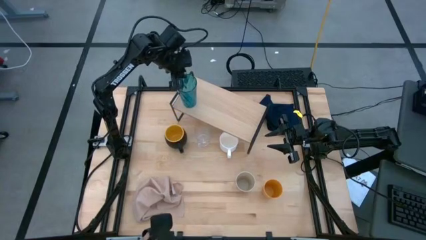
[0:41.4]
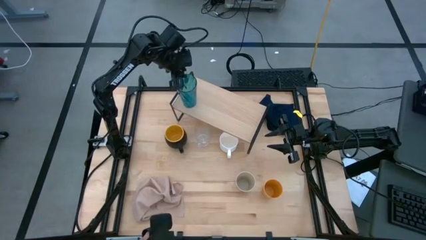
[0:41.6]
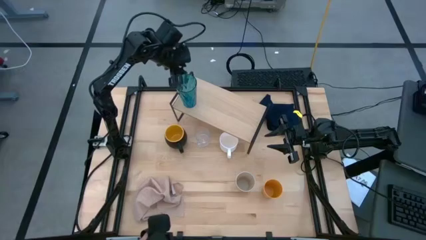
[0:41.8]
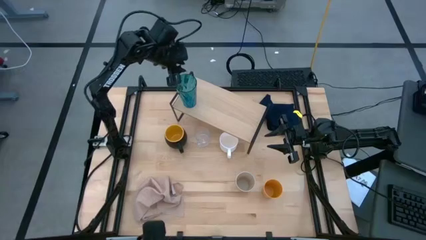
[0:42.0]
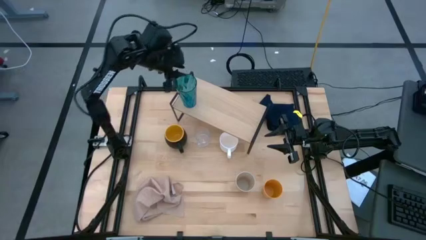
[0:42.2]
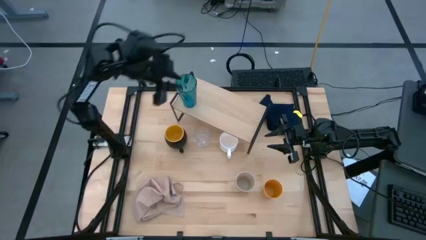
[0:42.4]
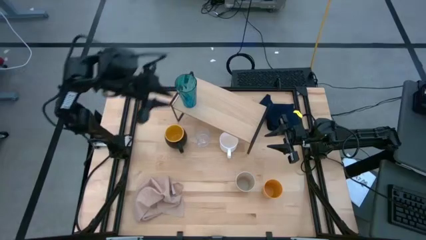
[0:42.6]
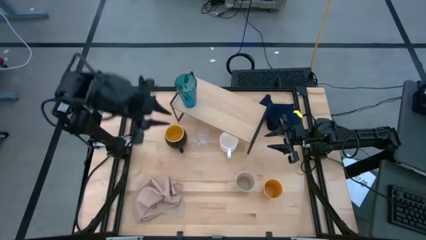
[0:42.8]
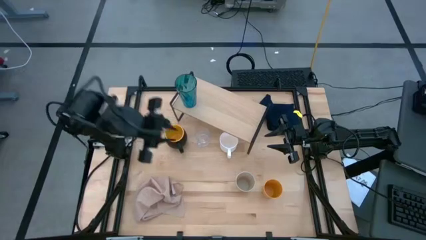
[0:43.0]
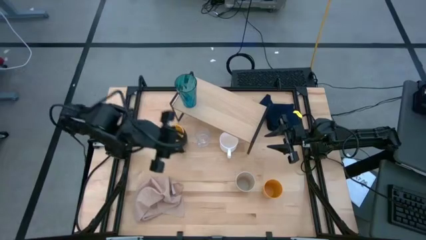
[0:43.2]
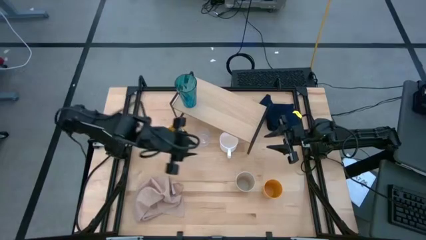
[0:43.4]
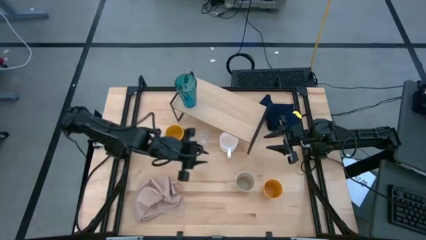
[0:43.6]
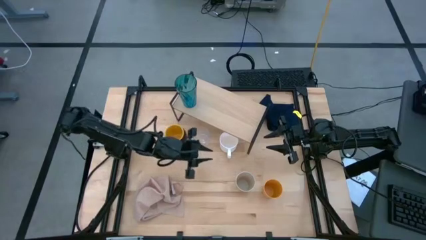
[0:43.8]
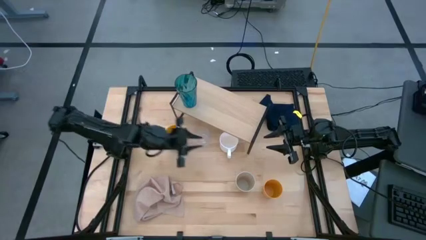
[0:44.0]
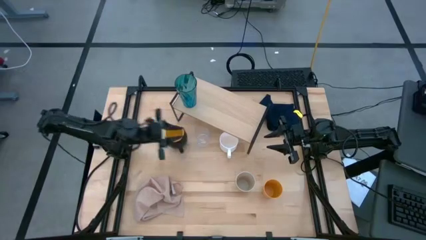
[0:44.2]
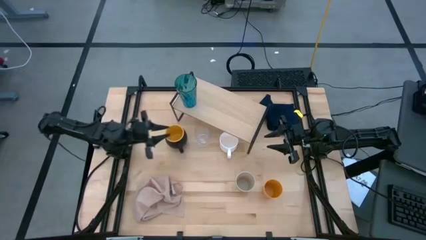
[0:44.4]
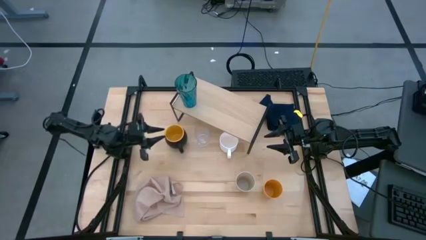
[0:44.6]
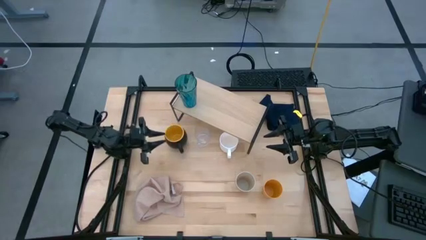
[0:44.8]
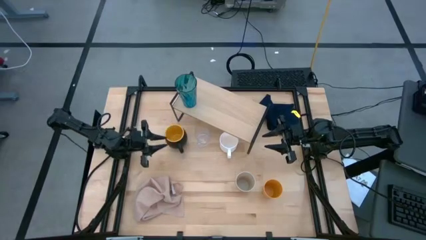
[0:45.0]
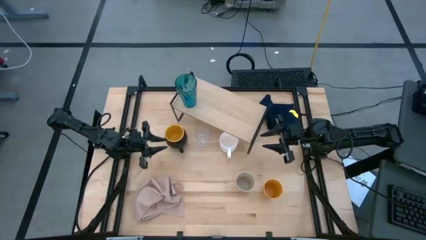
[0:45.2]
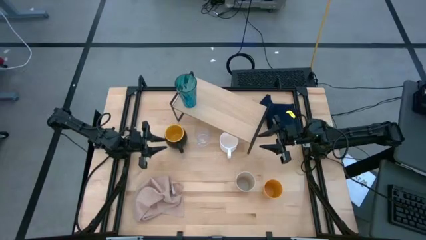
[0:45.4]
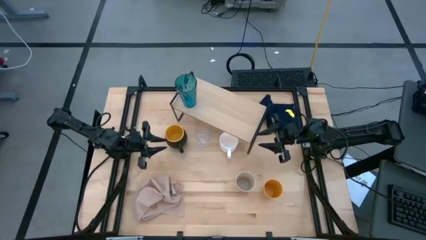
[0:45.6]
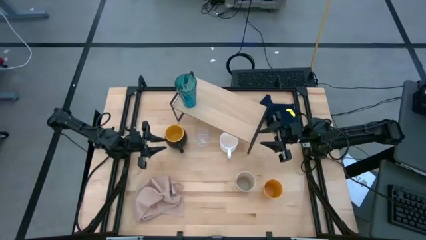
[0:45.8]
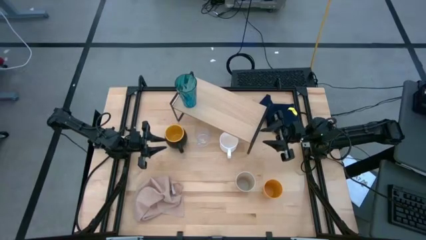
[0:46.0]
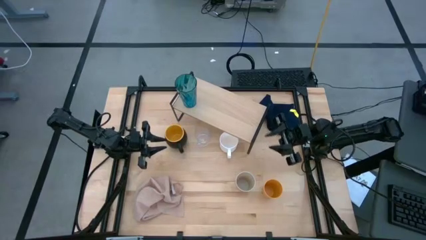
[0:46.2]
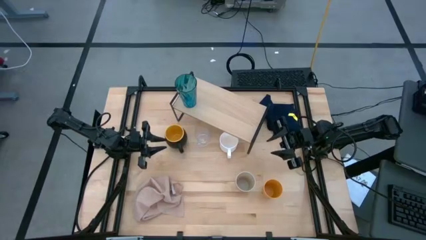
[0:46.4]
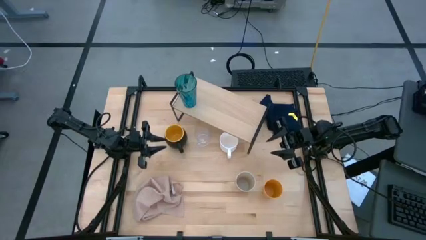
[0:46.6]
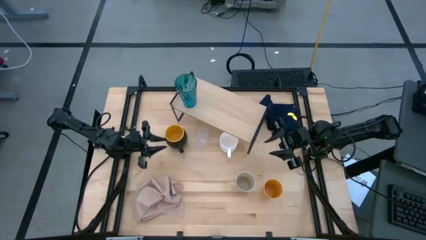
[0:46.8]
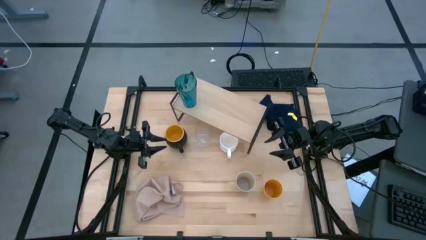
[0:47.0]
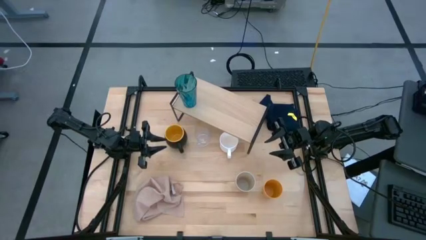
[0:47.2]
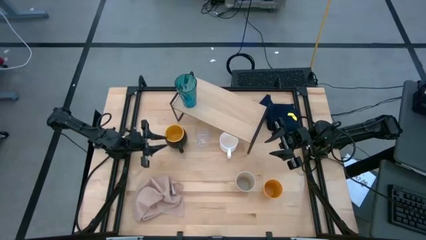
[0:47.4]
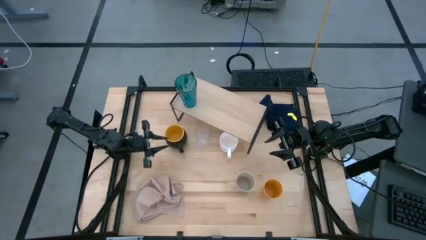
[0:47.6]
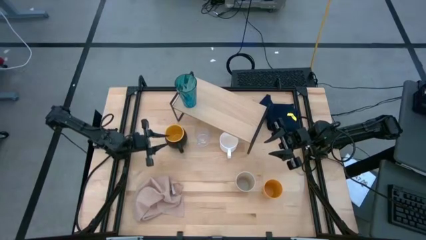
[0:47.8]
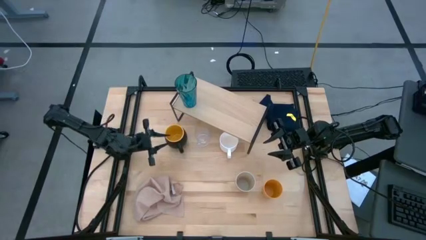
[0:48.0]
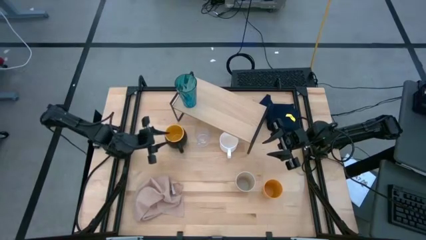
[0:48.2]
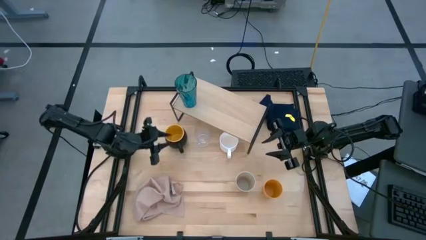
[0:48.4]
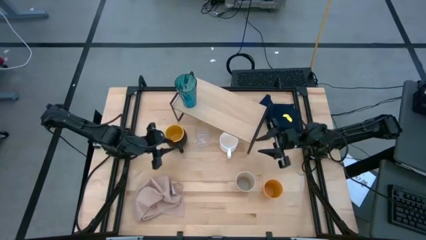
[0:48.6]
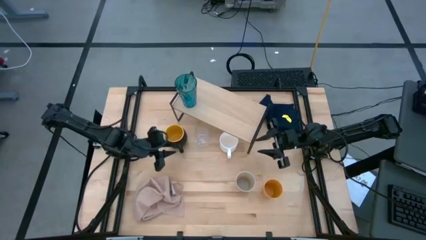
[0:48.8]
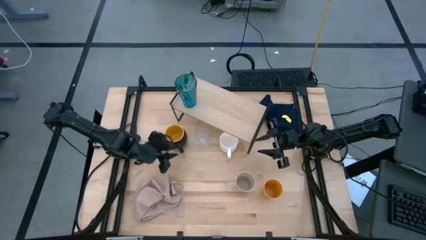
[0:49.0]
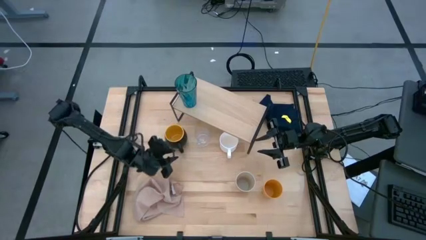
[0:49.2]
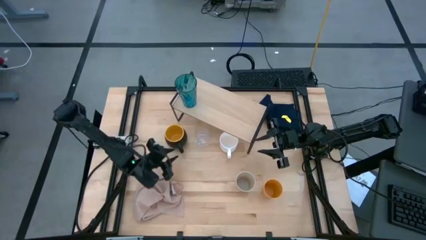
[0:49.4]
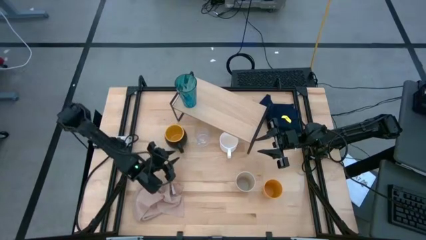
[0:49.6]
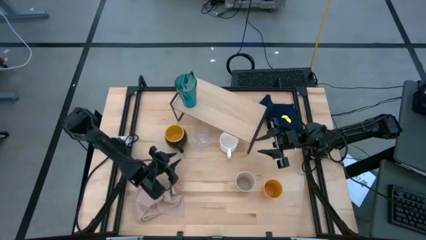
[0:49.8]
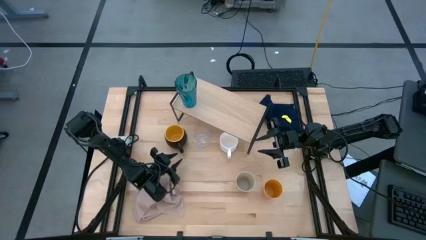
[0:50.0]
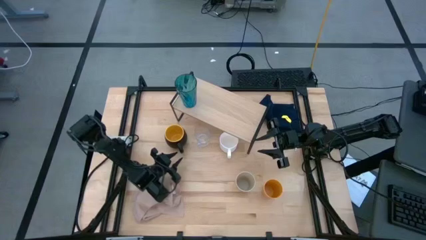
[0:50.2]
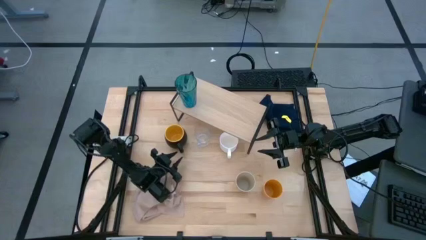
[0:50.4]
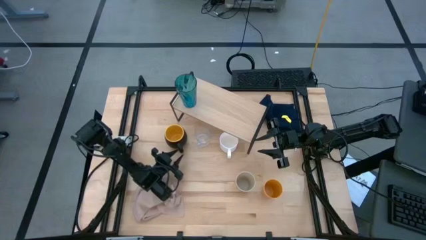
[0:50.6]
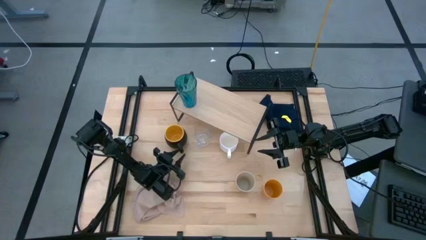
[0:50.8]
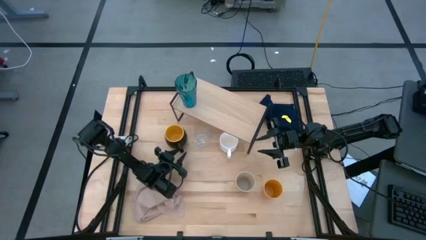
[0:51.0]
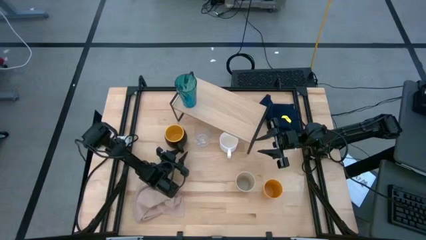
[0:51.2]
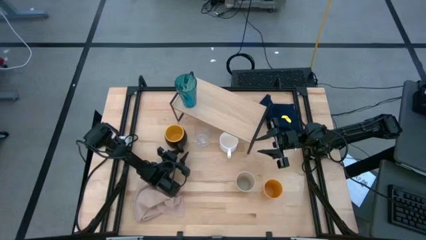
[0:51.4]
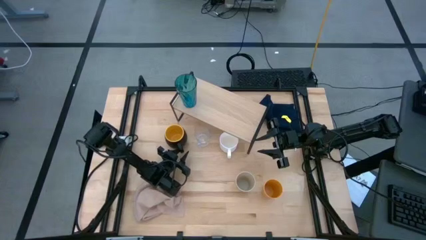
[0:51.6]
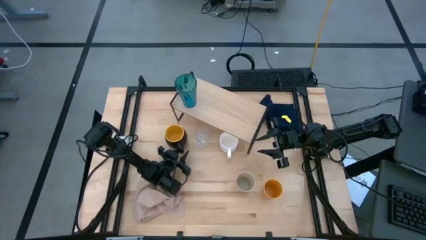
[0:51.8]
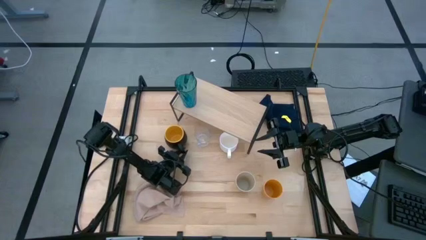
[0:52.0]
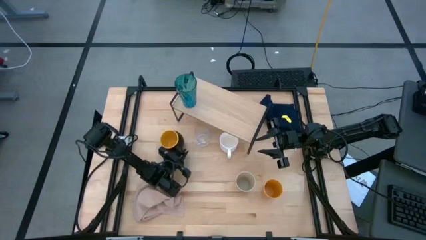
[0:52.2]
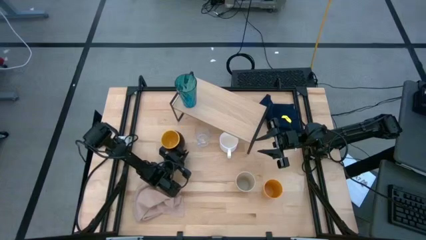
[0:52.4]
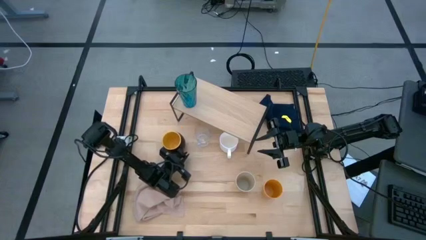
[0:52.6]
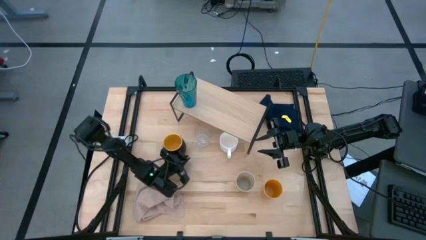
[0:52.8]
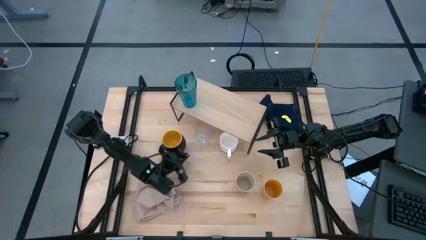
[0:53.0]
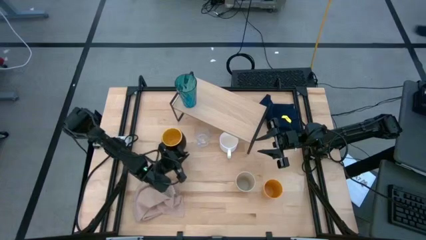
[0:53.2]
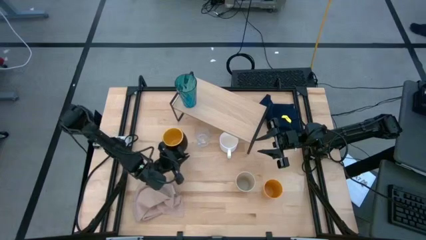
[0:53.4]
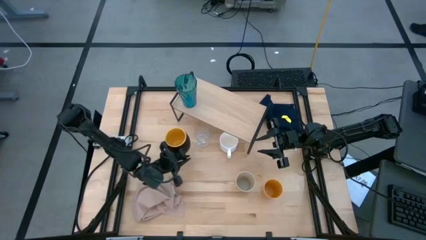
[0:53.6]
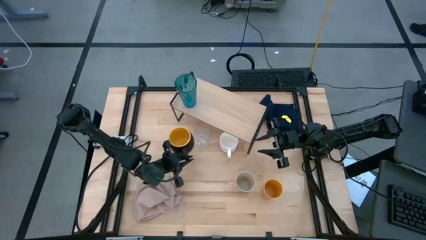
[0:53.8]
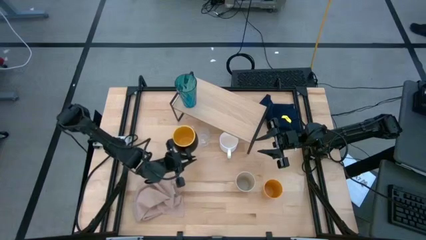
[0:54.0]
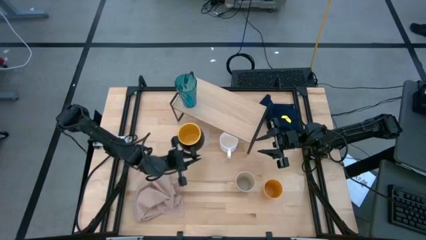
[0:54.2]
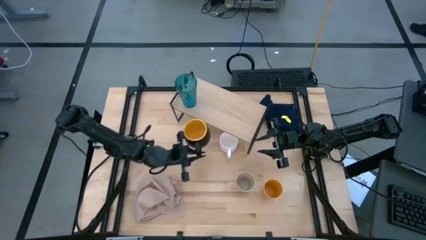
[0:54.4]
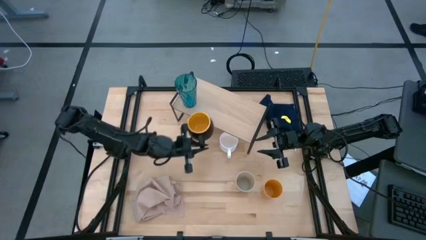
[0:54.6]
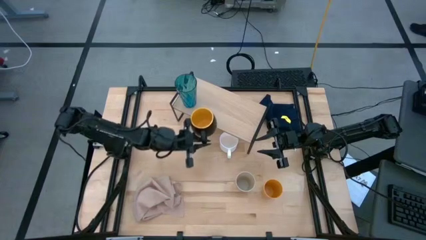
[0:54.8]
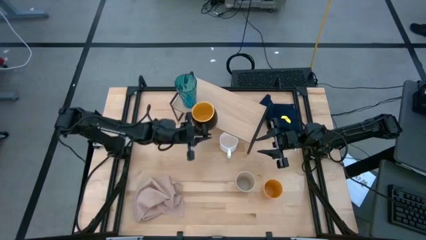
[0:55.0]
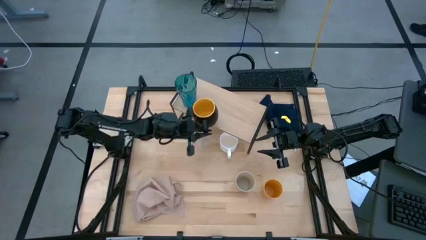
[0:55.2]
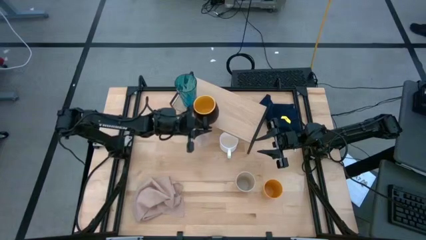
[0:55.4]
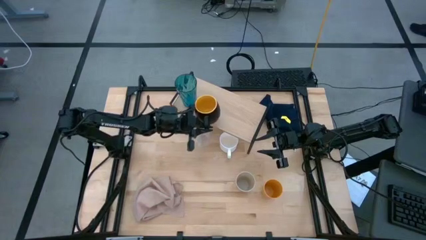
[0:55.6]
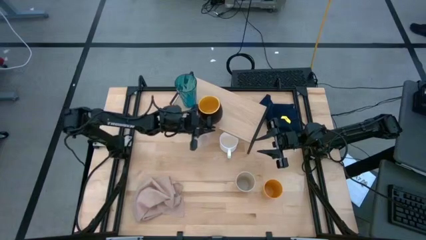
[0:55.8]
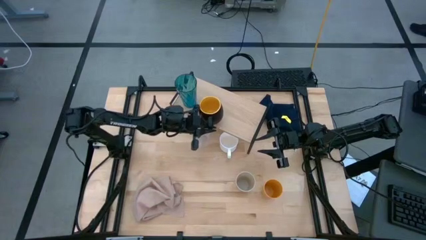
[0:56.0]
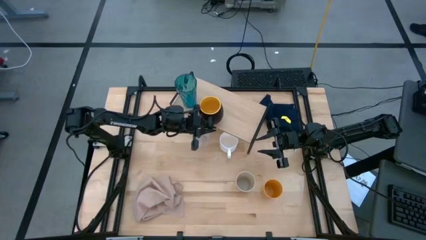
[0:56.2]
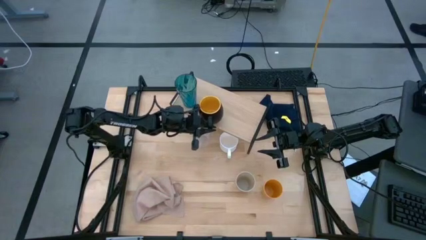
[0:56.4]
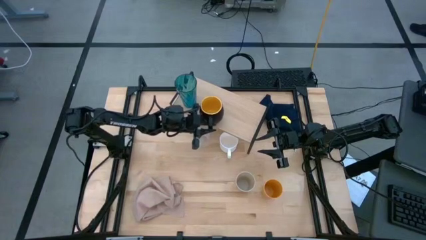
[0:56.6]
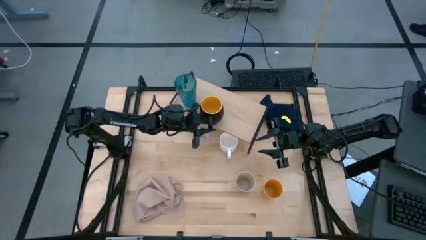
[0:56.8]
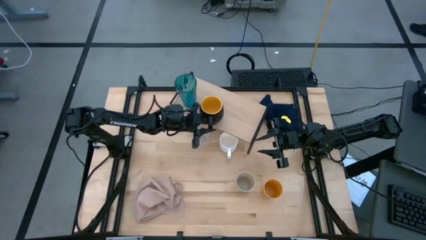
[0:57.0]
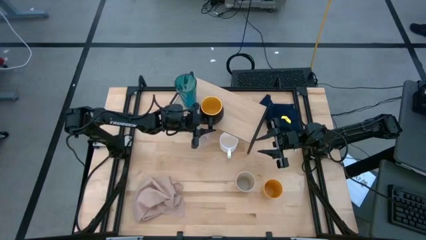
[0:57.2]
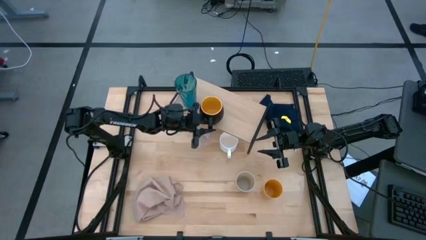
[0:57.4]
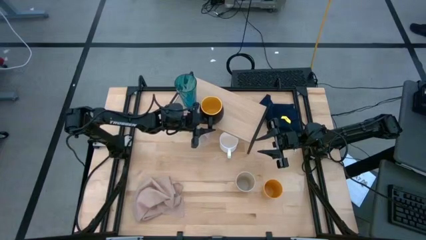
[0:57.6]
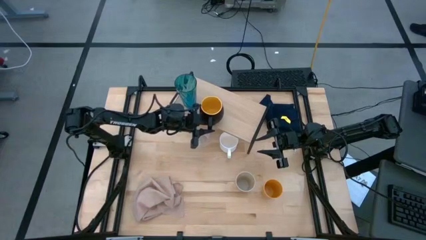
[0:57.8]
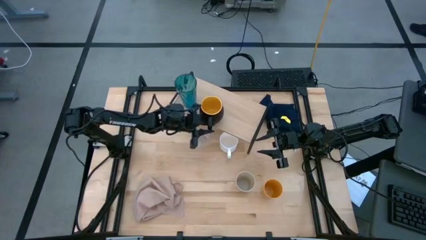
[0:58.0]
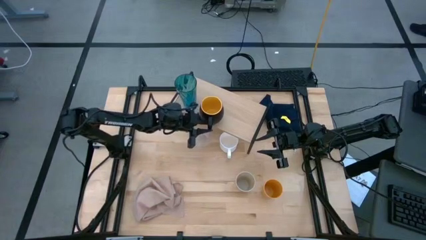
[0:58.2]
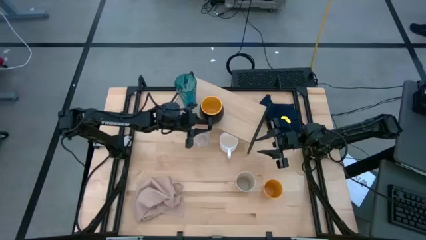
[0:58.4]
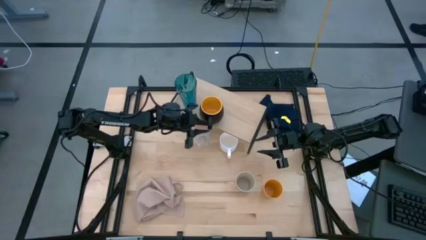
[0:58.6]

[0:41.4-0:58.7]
Task: Stack small to large cups/mugs on shelf
Put the mug on the shelf
